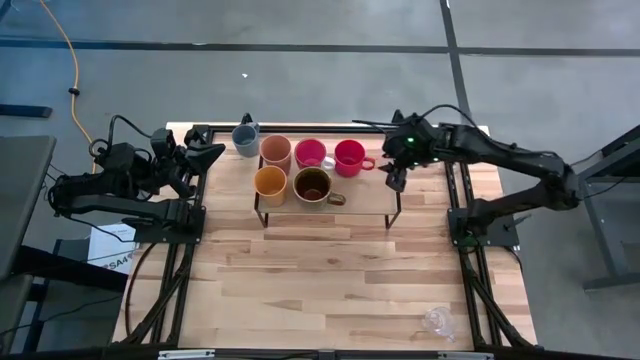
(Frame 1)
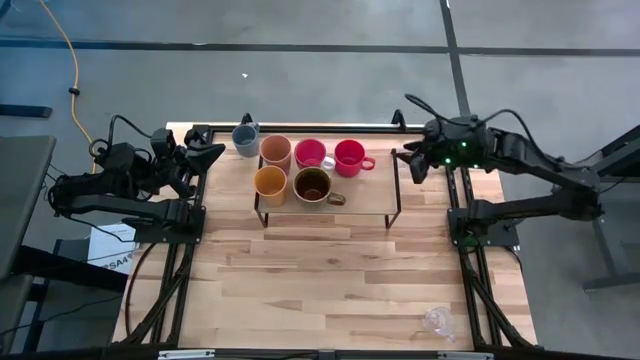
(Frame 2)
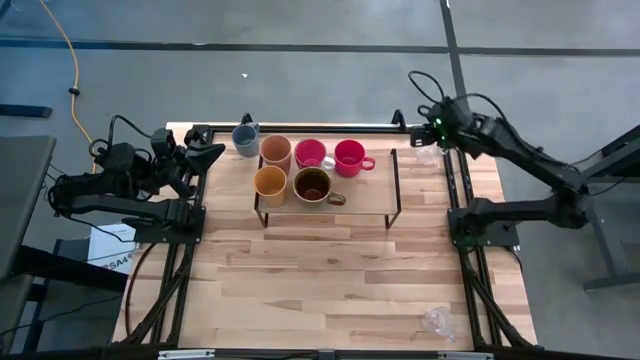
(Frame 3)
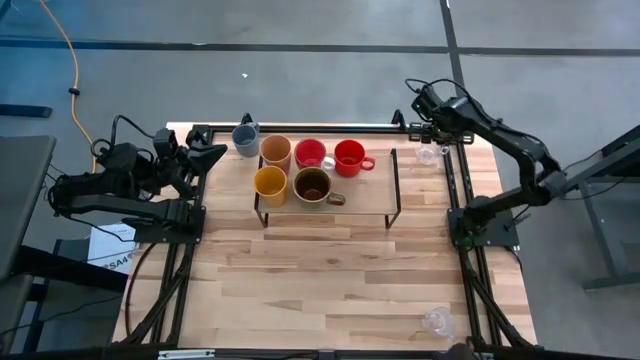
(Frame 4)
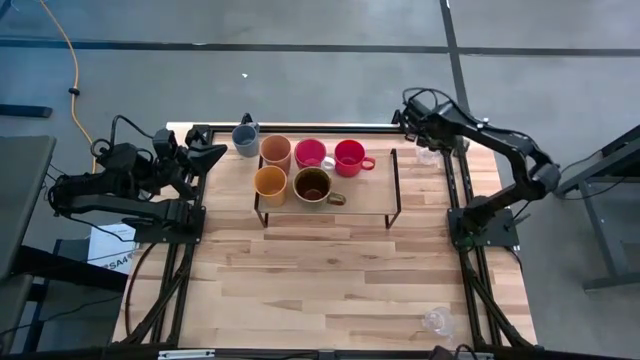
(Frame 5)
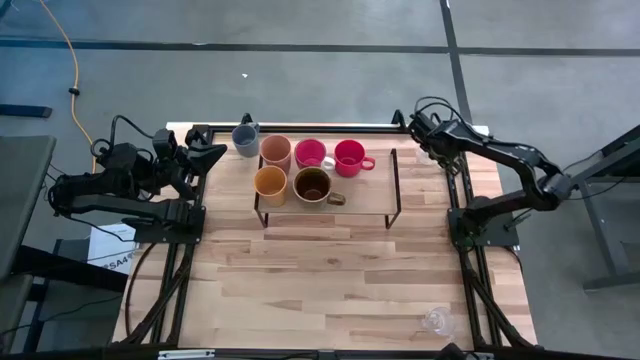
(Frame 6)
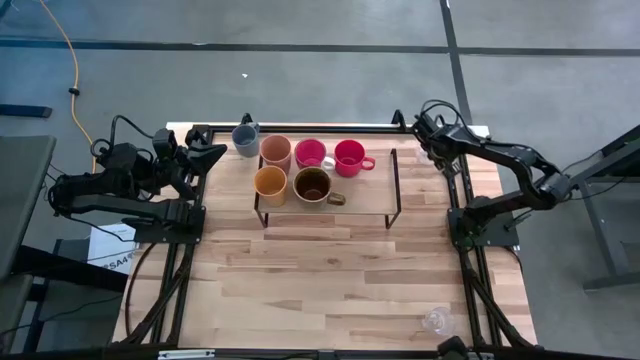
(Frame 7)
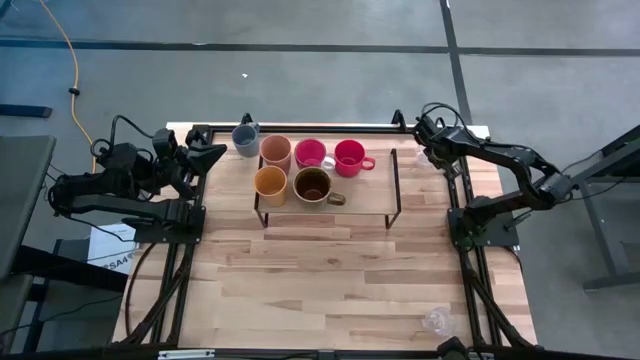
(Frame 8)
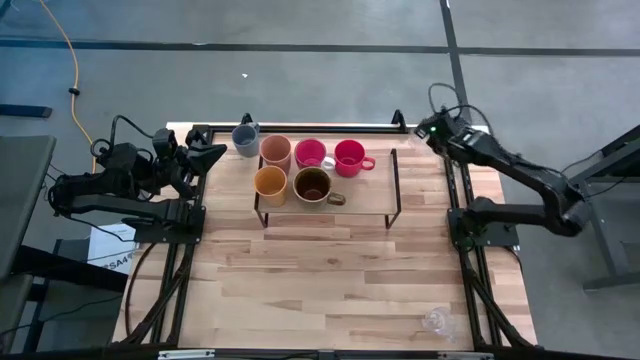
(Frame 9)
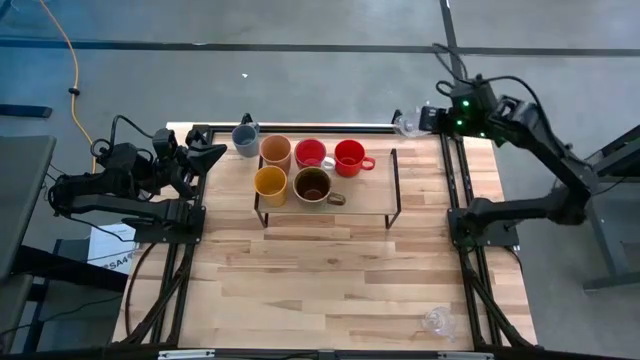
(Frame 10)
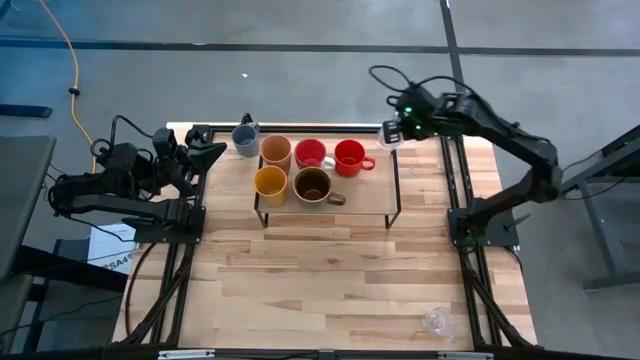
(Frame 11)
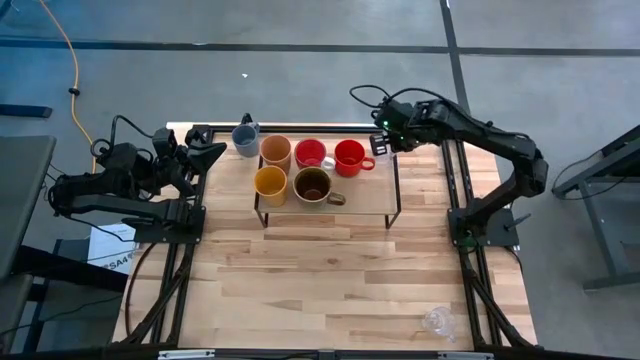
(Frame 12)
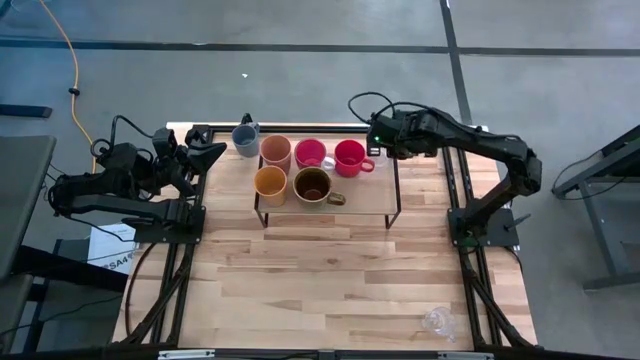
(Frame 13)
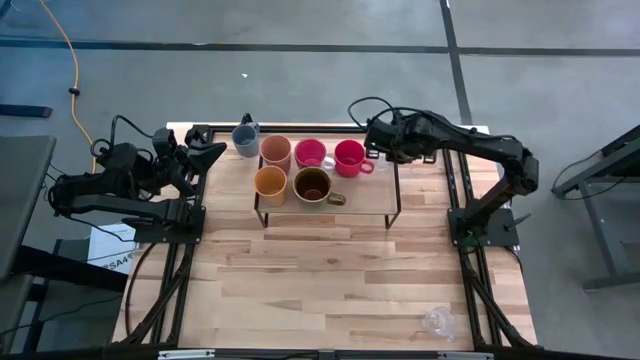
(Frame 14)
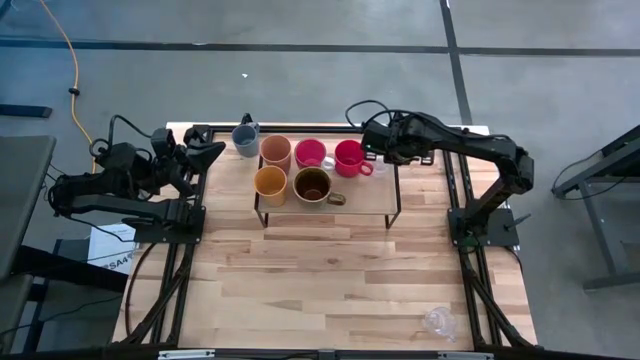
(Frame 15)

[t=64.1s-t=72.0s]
Task: Stack small to large cups/mugs on shelf
Put the top transparent mug on the shelf

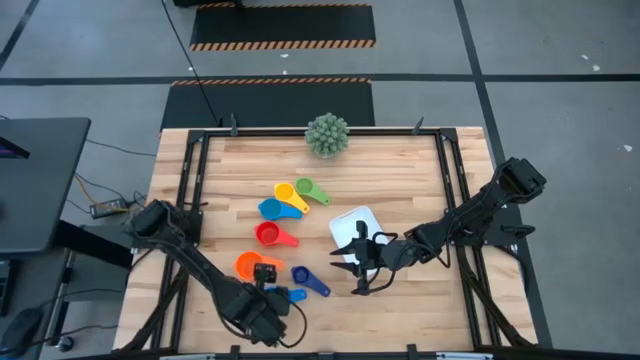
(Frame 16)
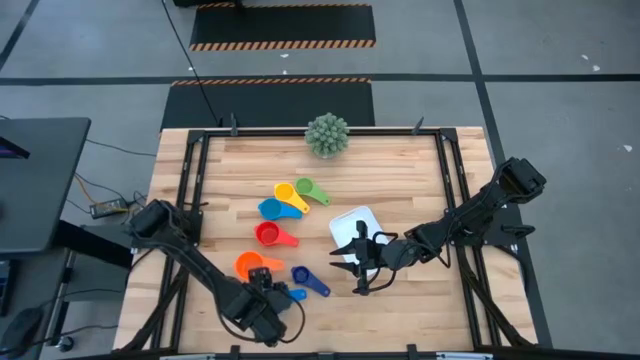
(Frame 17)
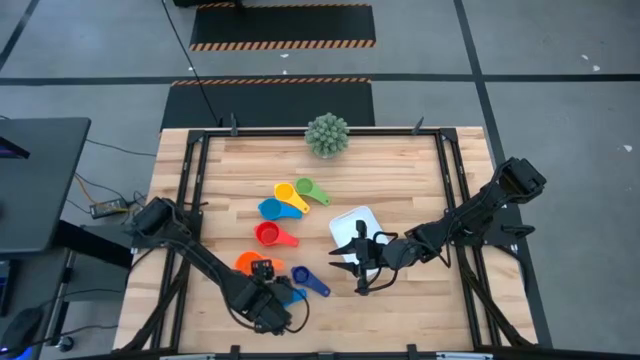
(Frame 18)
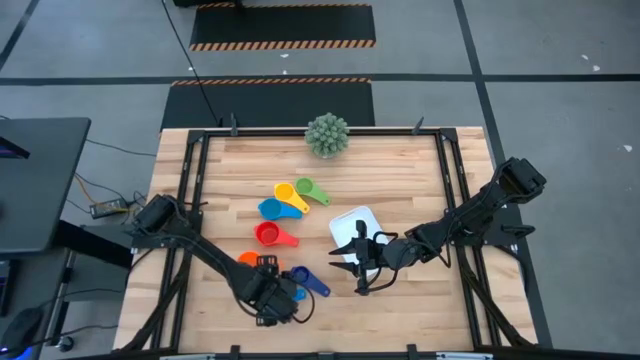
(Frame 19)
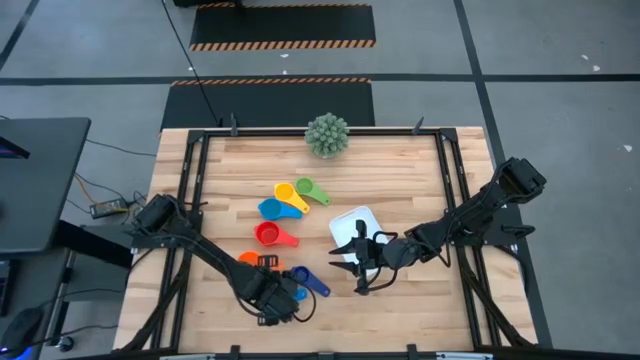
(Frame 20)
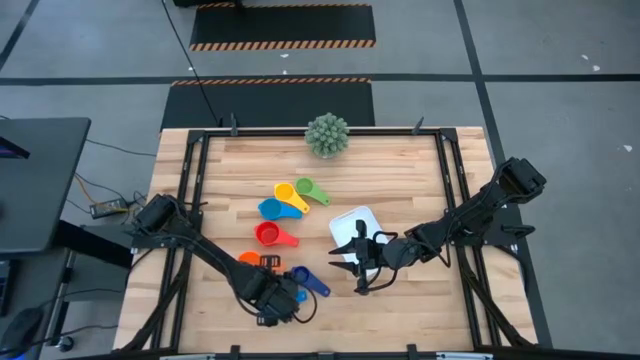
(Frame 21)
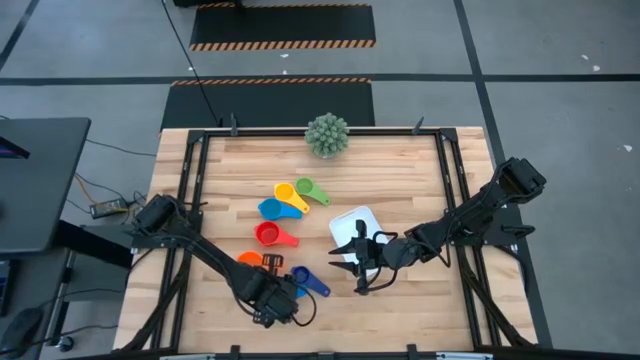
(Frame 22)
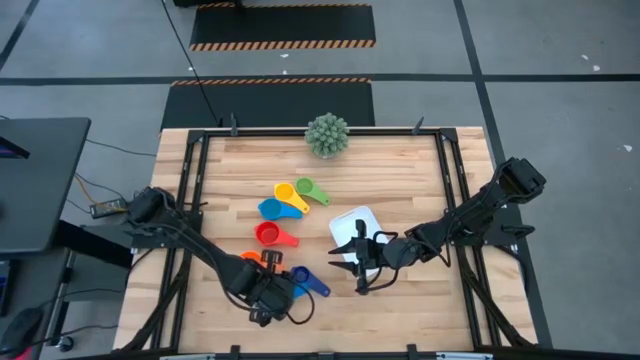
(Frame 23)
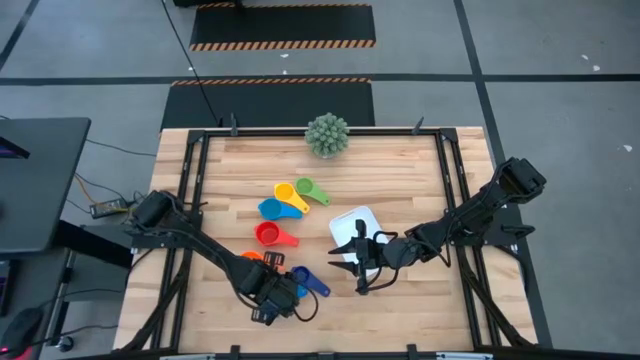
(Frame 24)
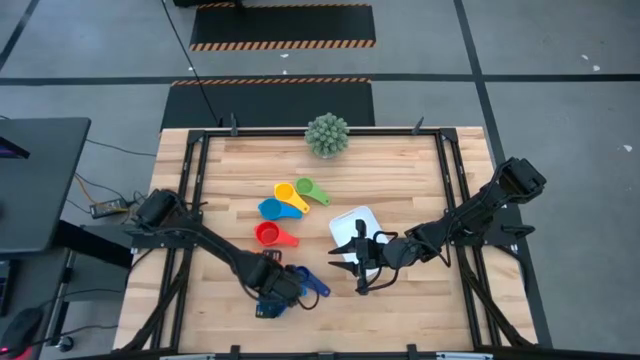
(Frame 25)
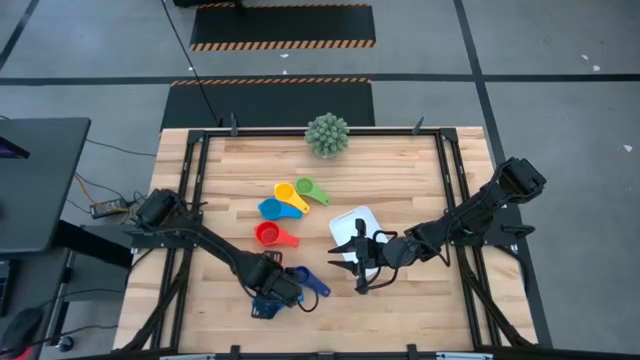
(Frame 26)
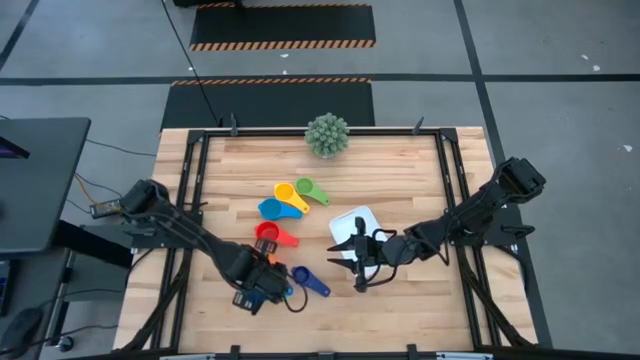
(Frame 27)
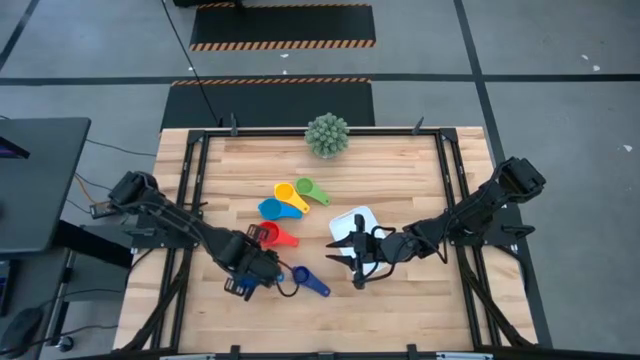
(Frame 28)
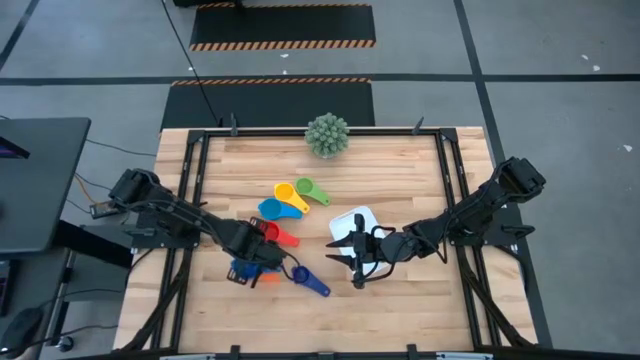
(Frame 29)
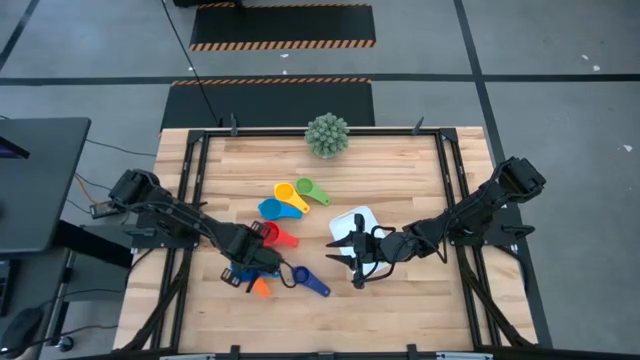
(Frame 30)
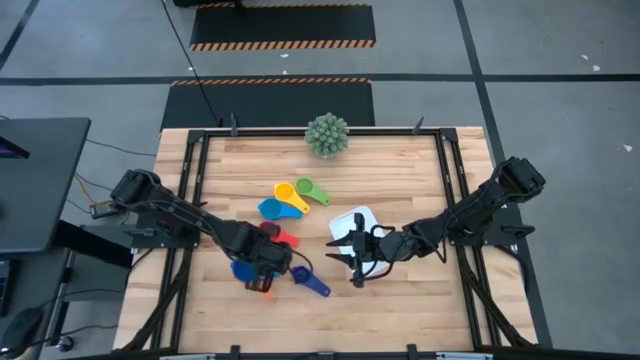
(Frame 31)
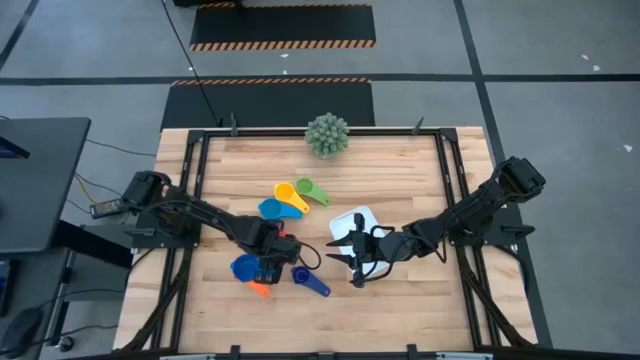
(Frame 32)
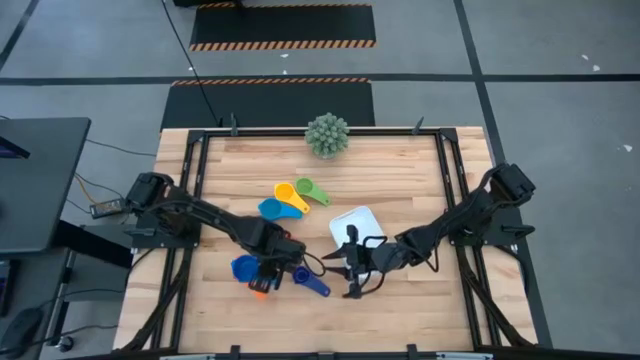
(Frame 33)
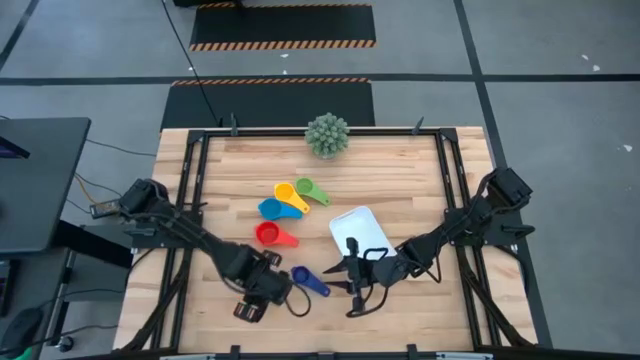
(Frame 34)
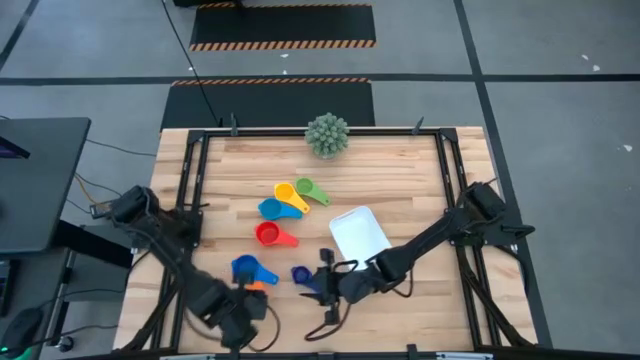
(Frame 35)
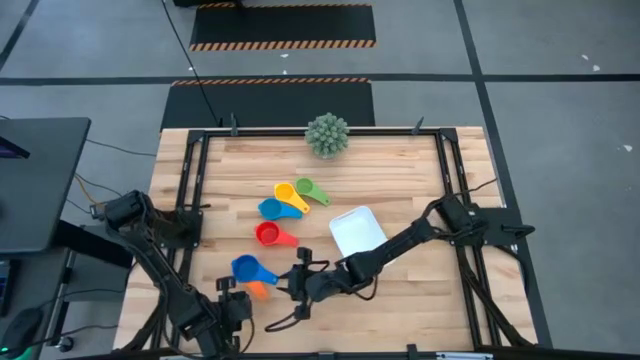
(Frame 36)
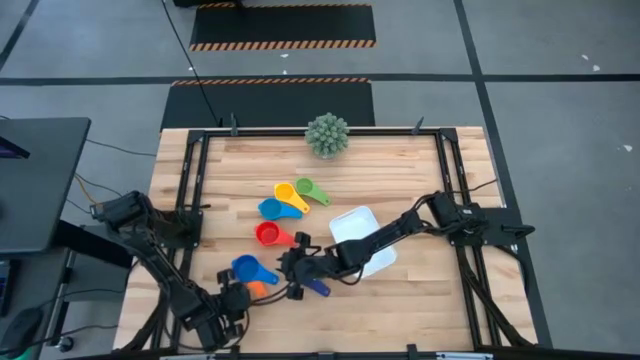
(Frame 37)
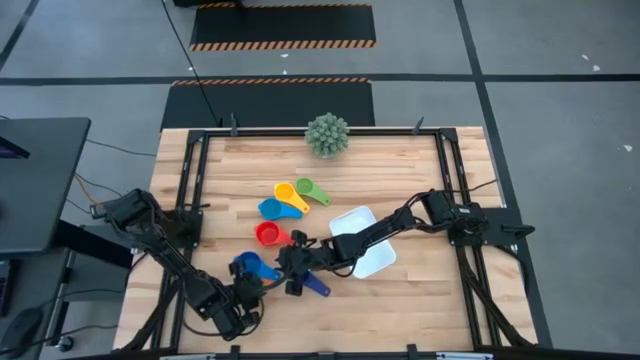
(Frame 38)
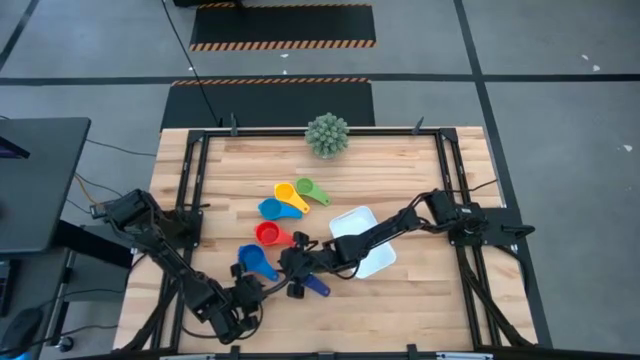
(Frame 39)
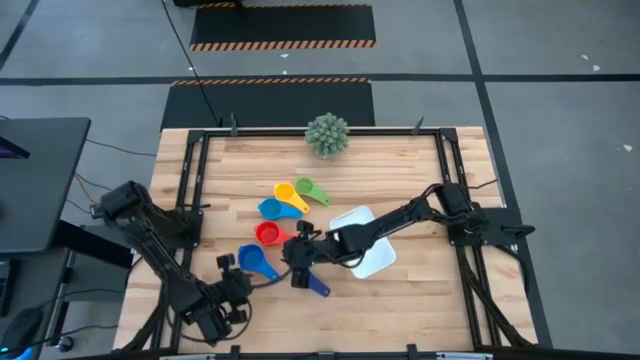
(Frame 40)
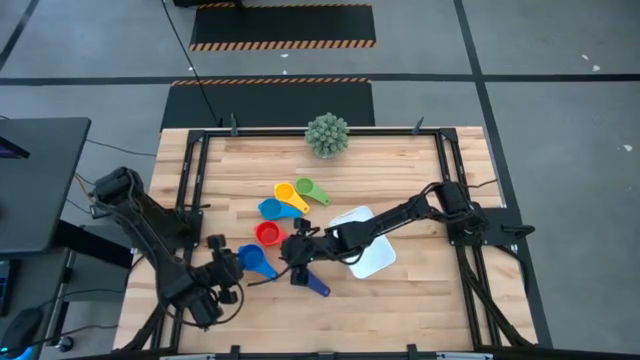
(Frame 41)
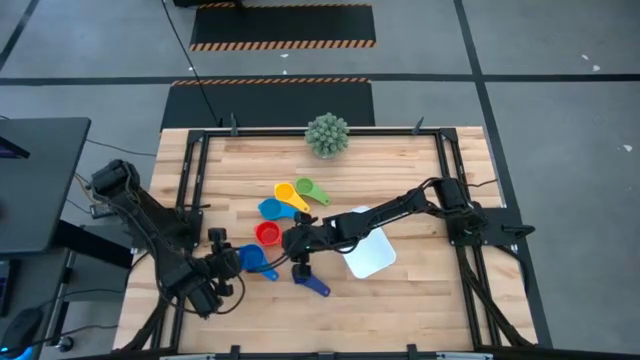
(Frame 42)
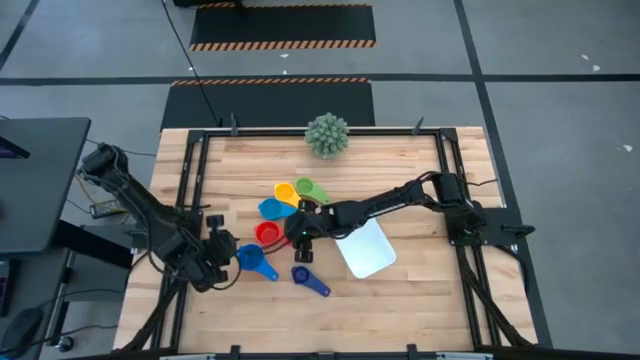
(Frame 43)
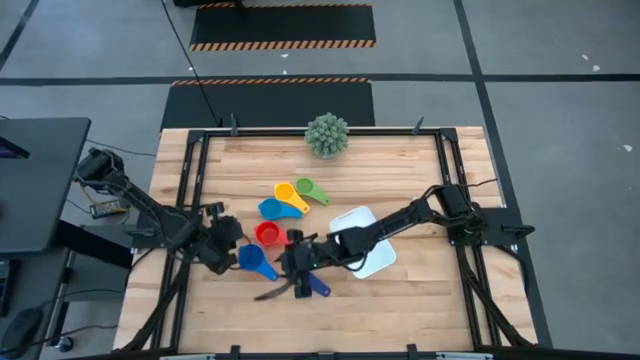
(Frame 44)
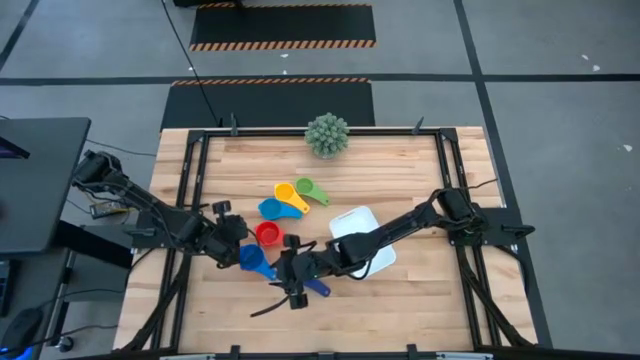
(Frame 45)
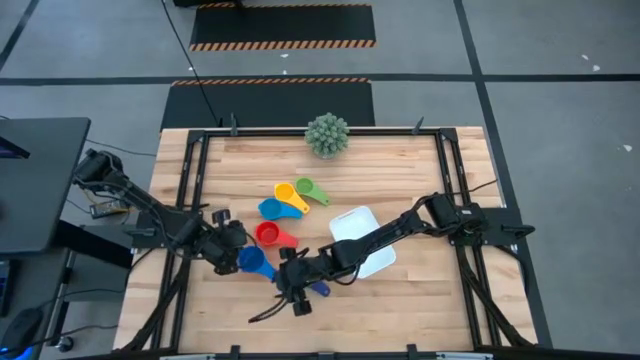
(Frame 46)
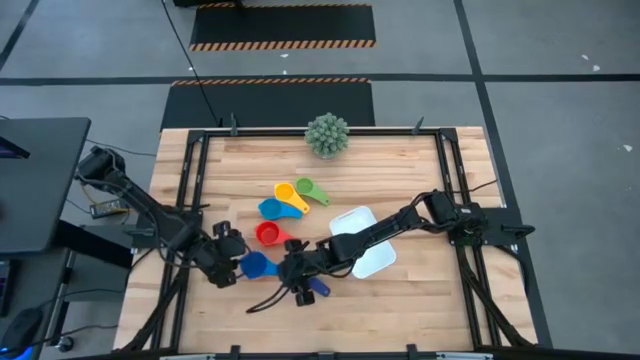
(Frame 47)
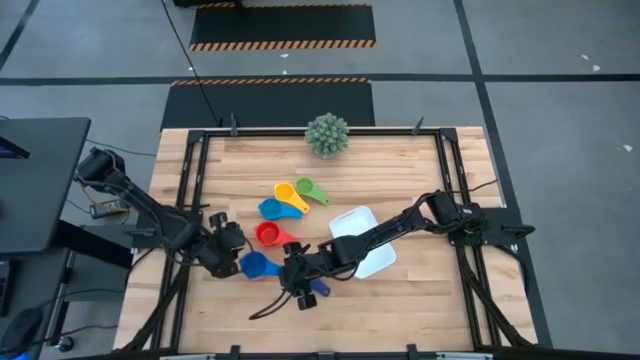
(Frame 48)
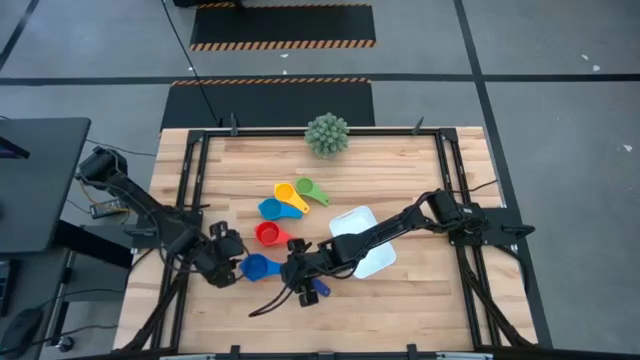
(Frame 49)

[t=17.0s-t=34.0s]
Task: Nest measuring cups in basket
Stack the blue measuring cup on top of the orange measuring cup
